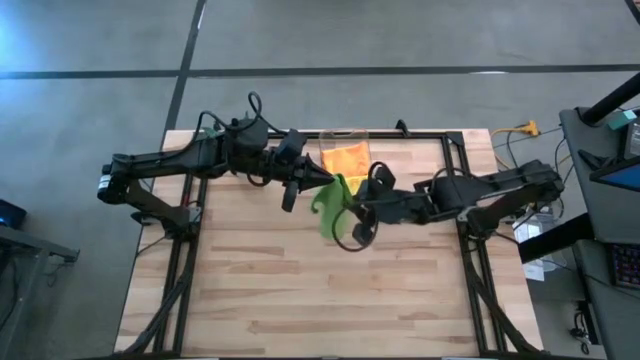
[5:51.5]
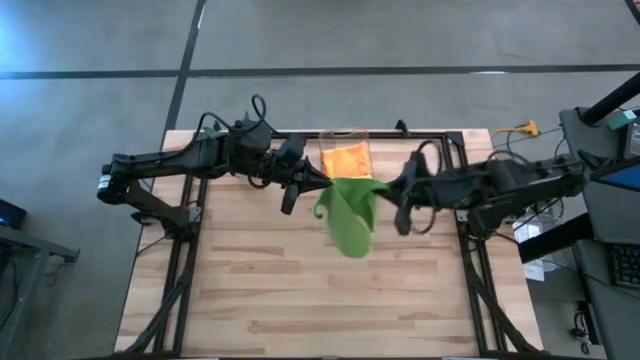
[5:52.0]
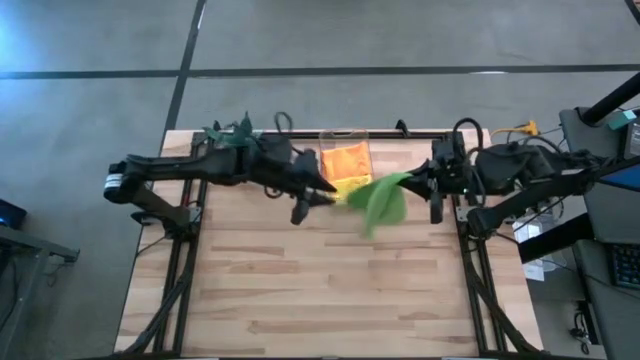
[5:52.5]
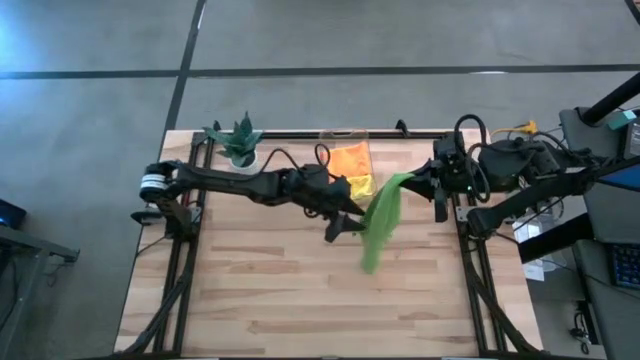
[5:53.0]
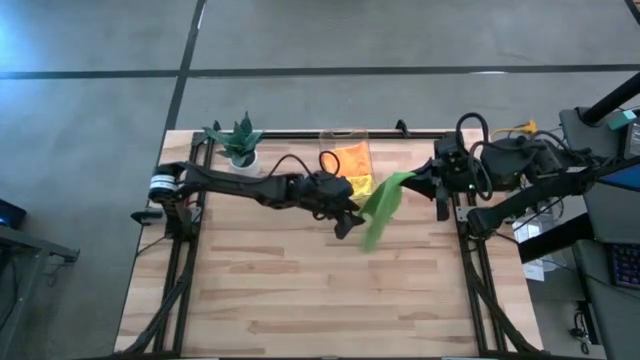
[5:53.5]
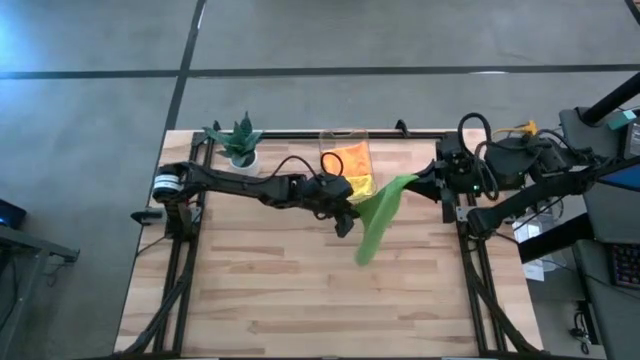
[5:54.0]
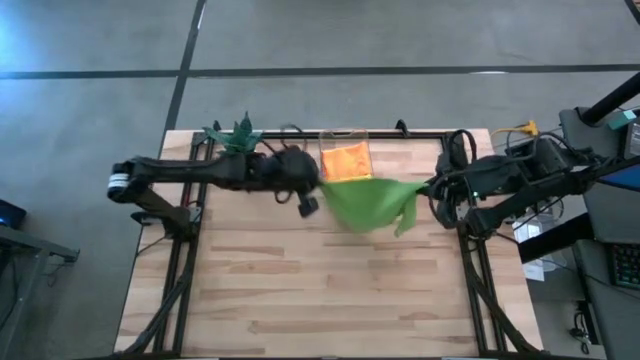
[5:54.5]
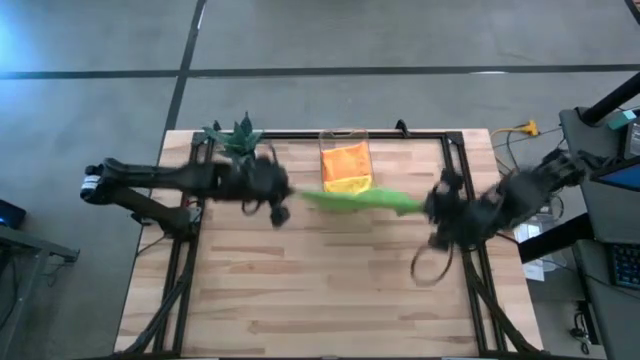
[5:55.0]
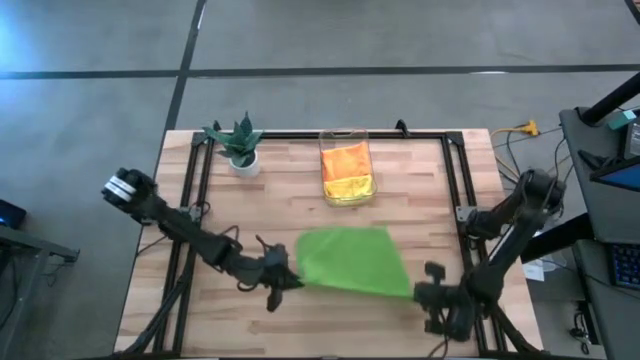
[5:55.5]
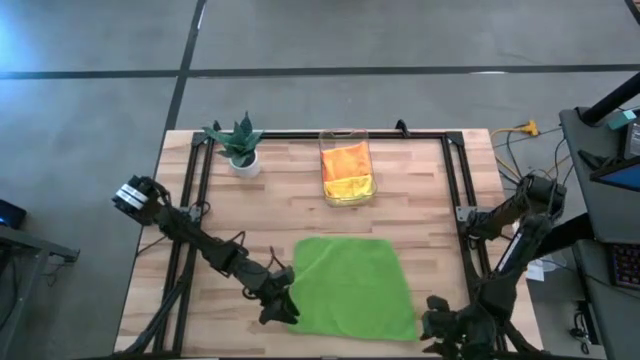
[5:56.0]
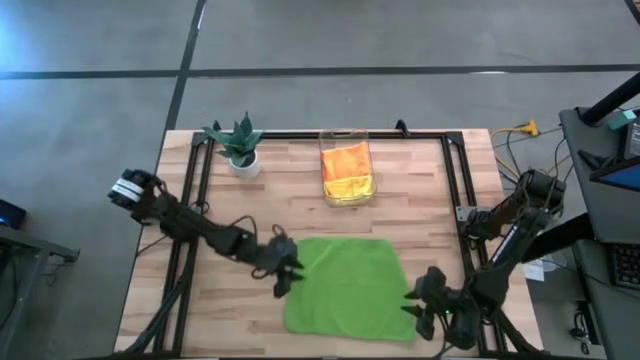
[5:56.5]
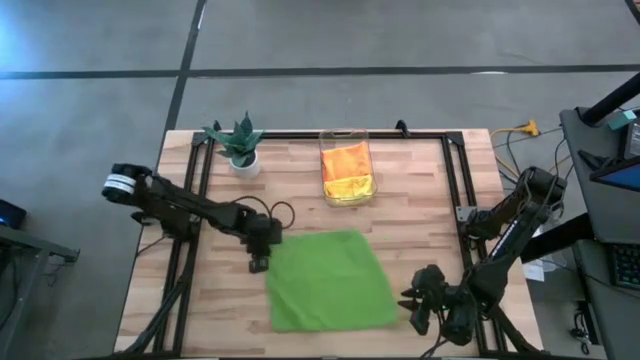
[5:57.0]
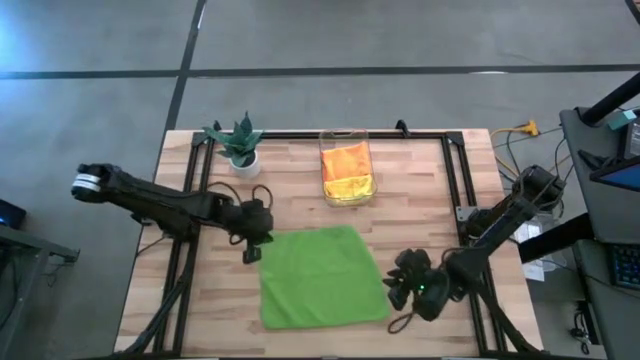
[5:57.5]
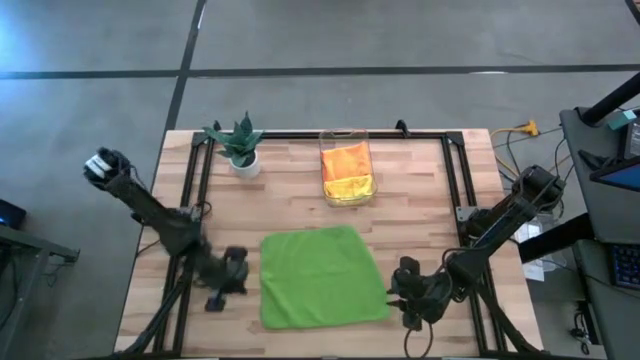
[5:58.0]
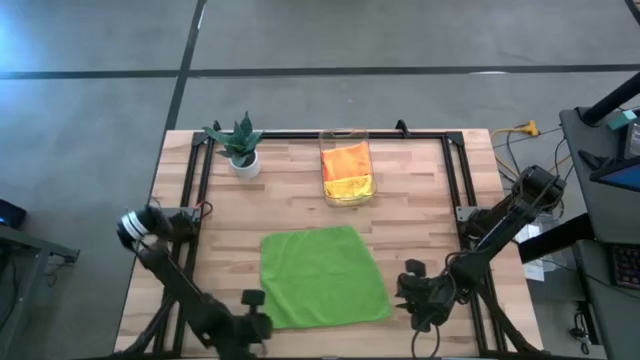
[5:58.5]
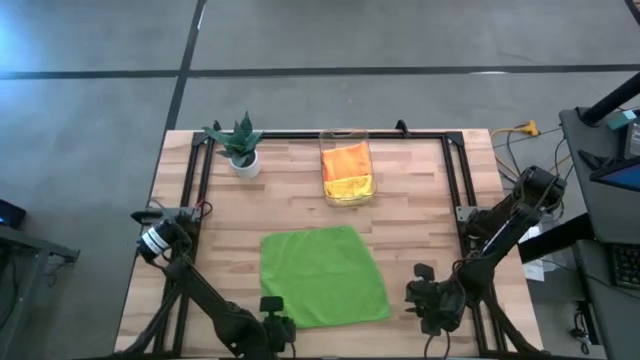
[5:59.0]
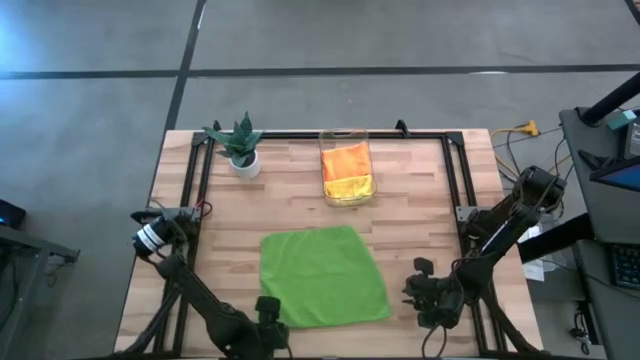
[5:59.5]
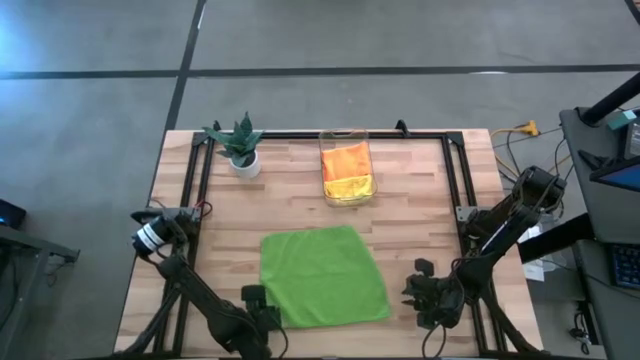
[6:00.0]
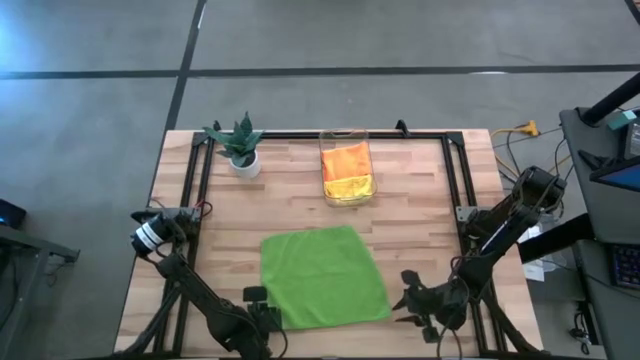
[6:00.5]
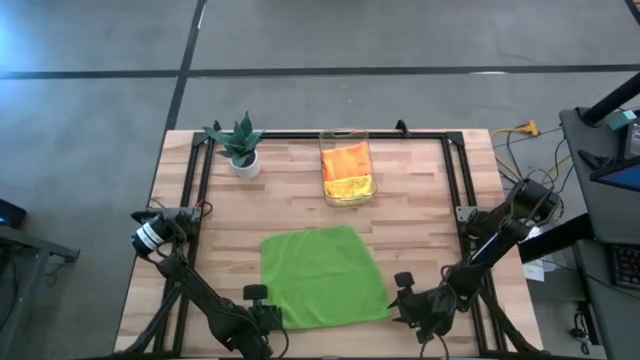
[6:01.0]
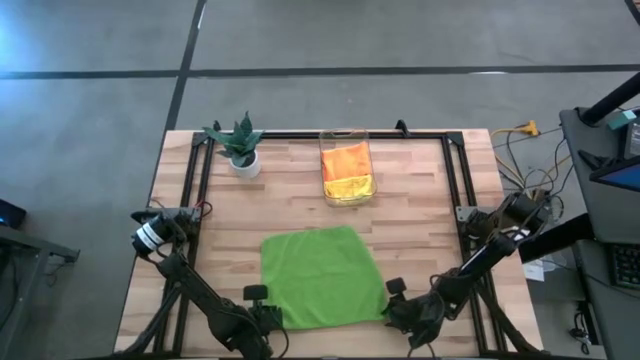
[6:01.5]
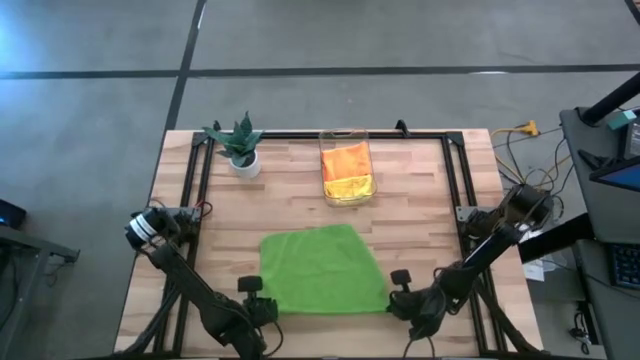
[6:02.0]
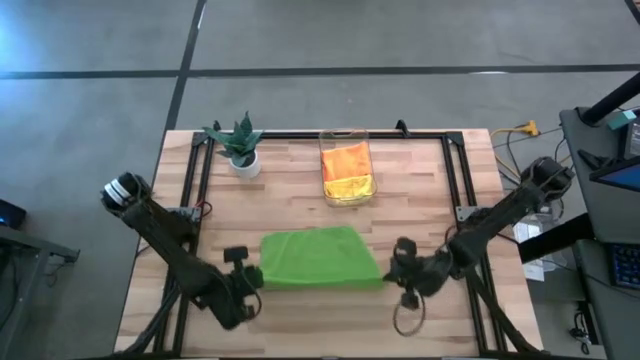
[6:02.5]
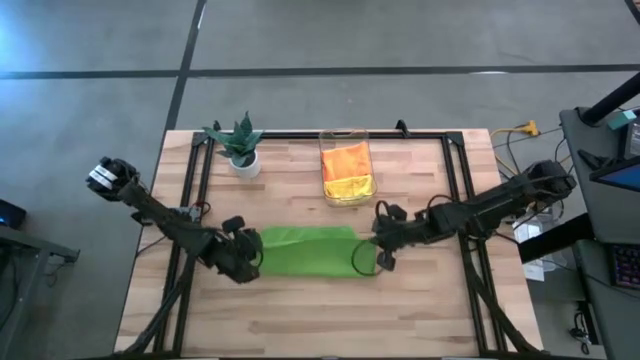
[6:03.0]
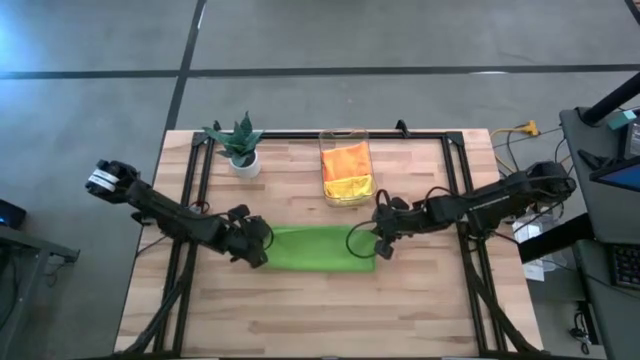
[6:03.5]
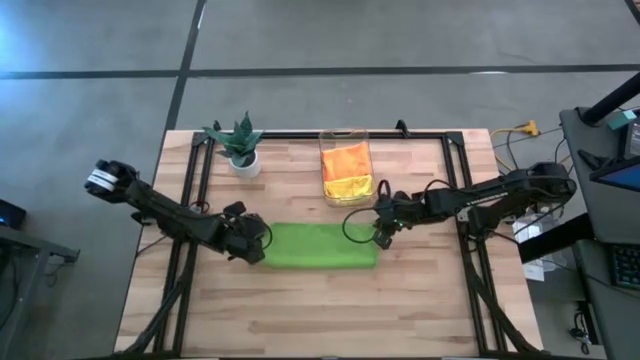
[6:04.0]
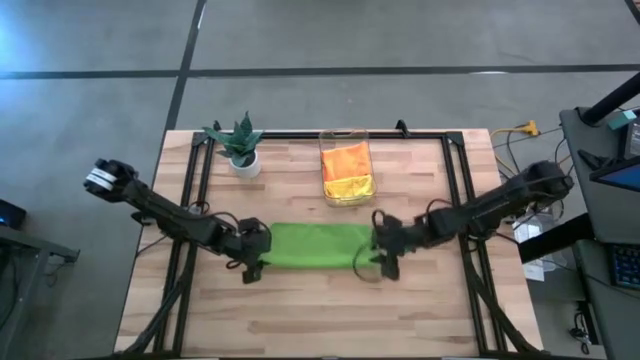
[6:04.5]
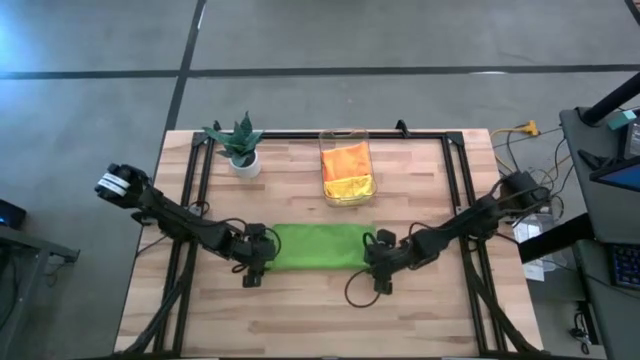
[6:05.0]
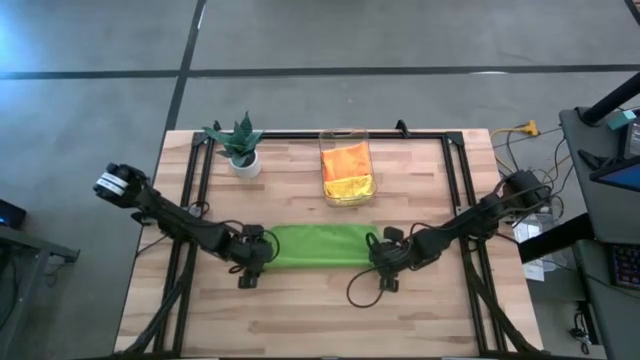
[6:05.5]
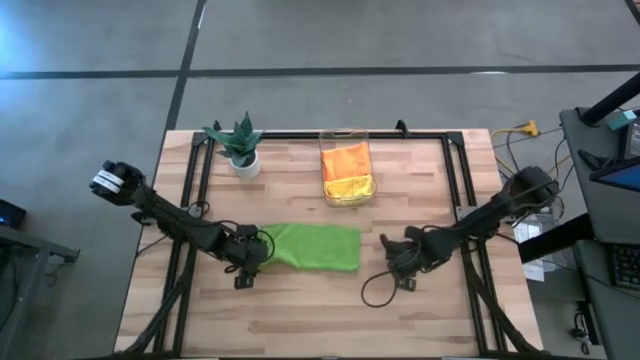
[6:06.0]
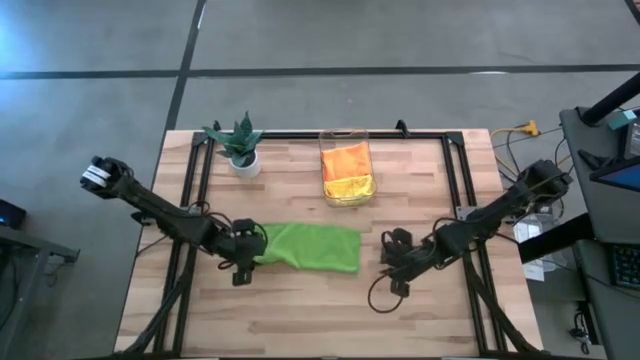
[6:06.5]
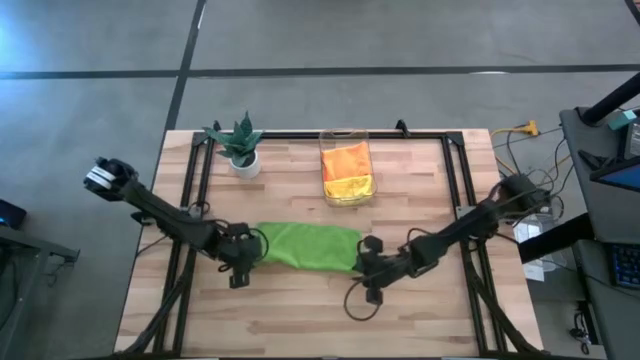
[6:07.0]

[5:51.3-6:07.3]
Task: Fold microfiber towels
Fold the green towel

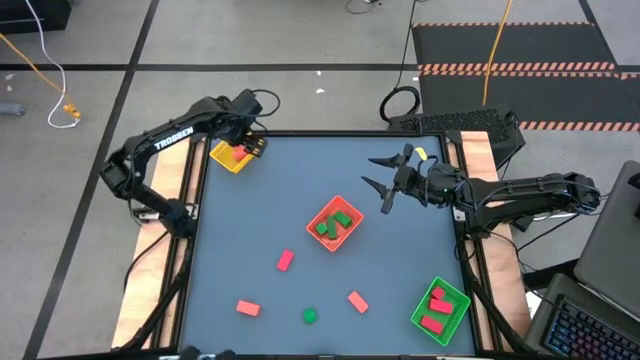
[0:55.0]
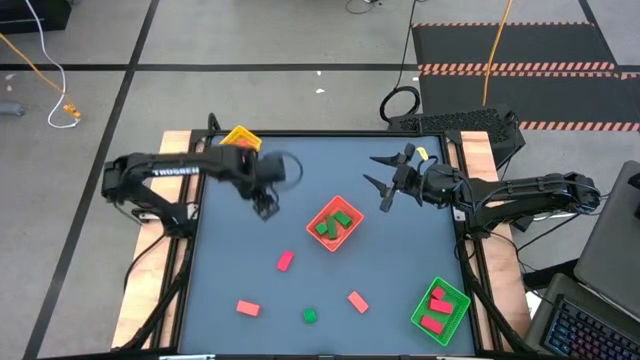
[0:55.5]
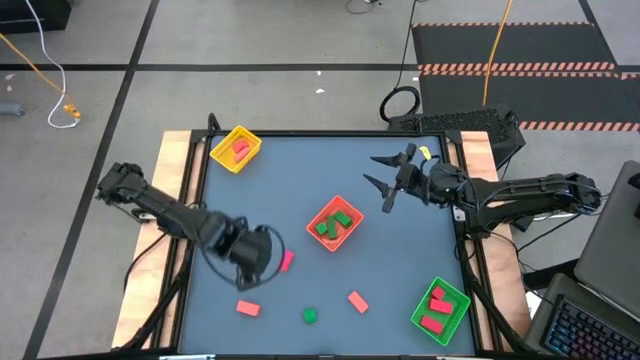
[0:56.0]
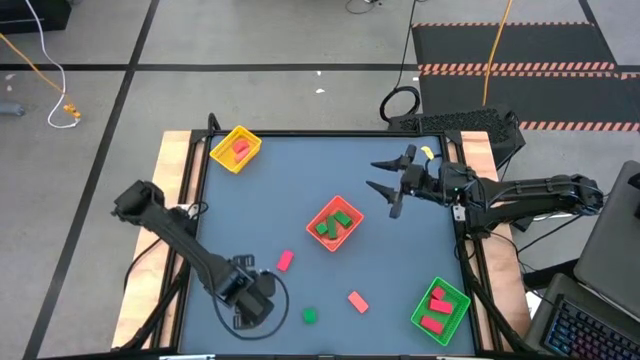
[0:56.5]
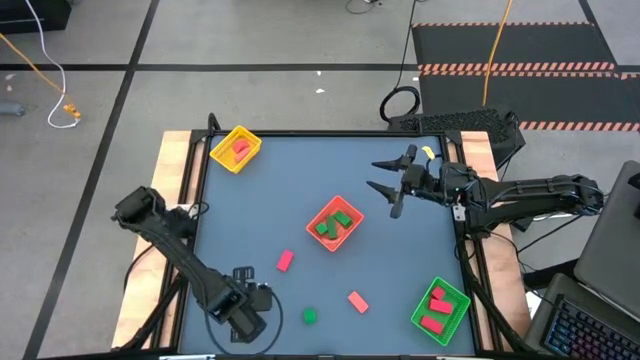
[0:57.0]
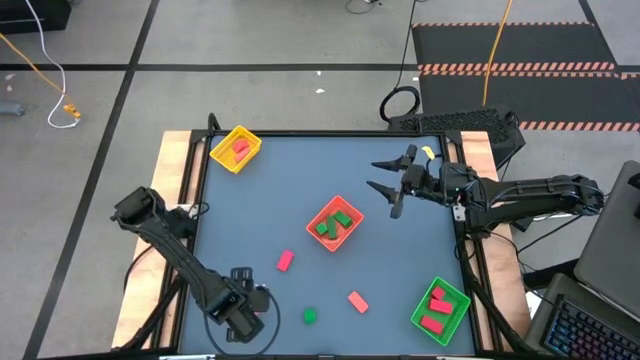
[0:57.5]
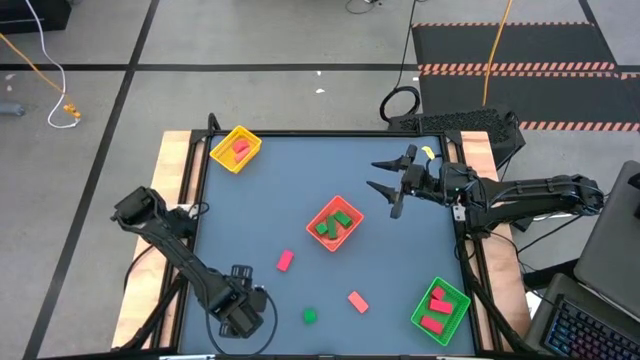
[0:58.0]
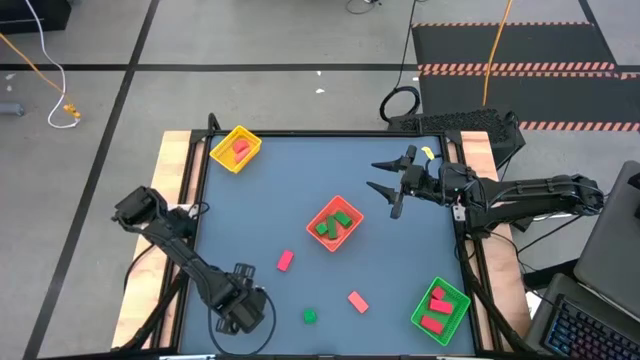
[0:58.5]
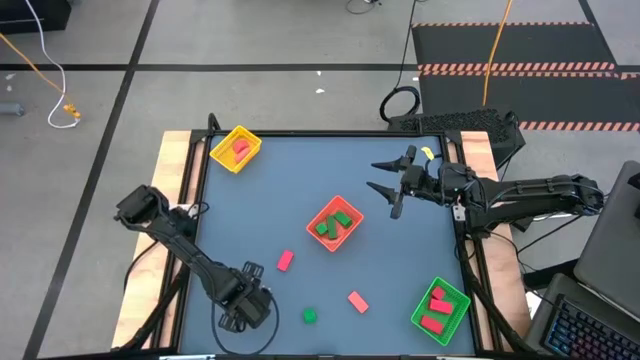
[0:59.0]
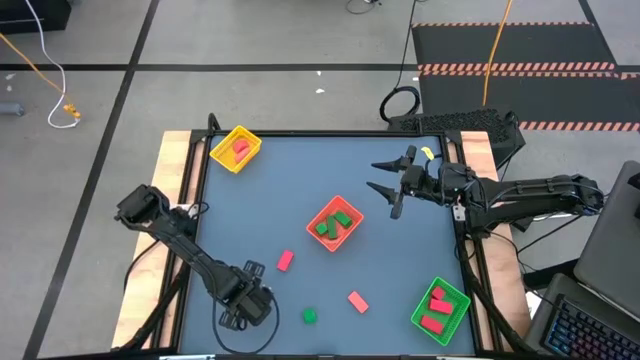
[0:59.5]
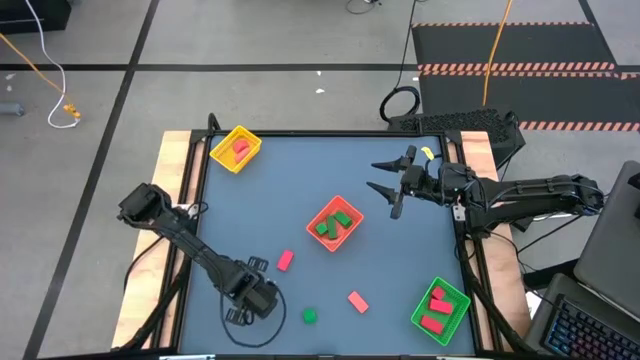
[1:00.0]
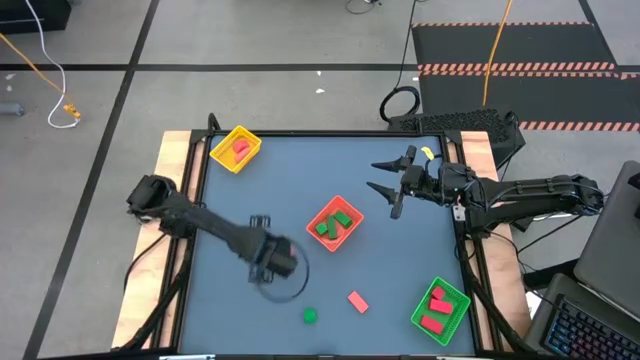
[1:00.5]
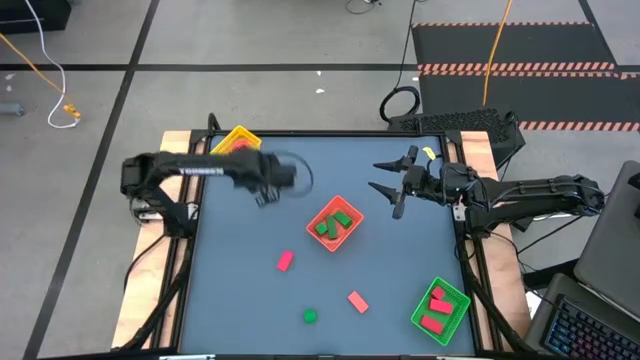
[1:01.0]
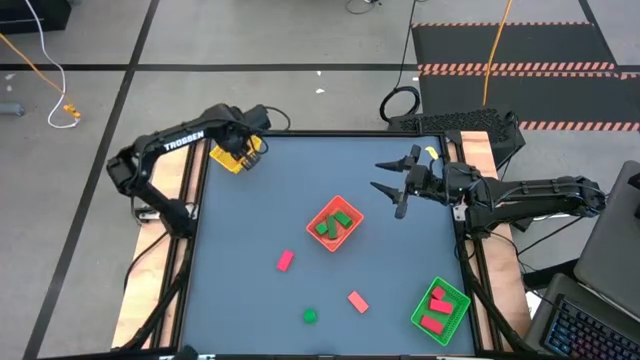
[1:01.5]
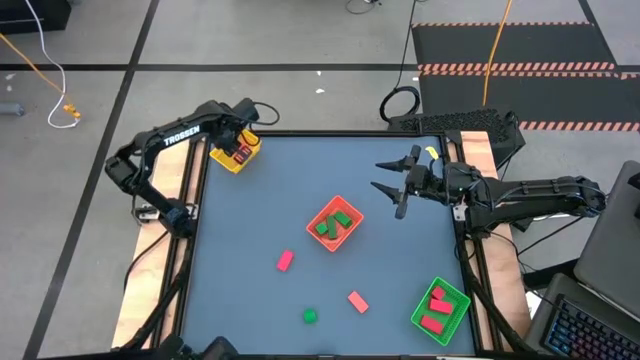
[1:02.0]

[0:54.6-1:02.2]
Task: Sort & place blocks by color
Put the orange block into the yellow bin
